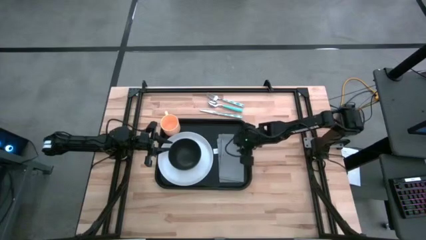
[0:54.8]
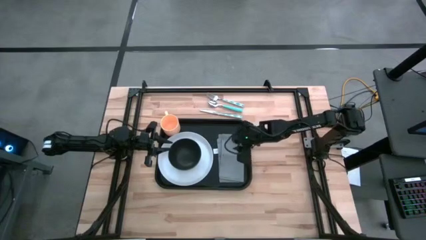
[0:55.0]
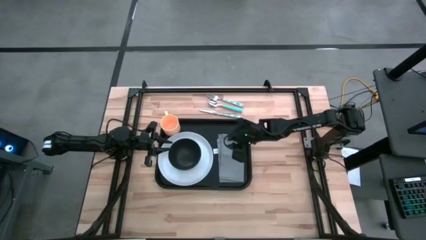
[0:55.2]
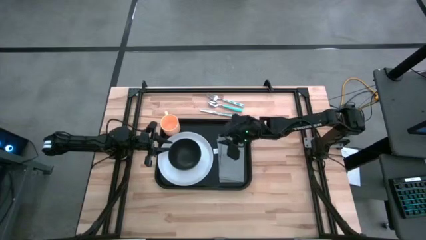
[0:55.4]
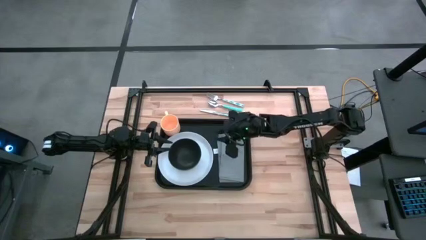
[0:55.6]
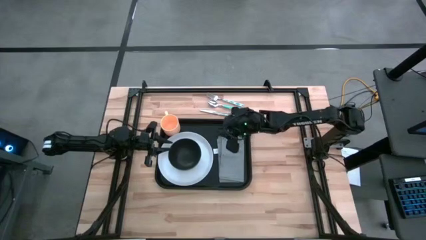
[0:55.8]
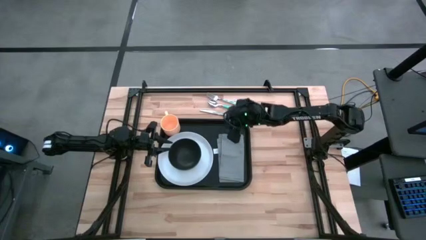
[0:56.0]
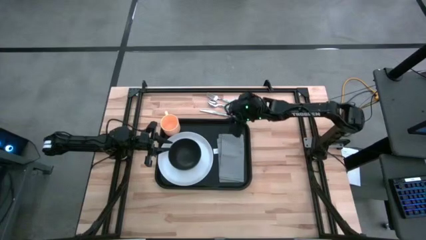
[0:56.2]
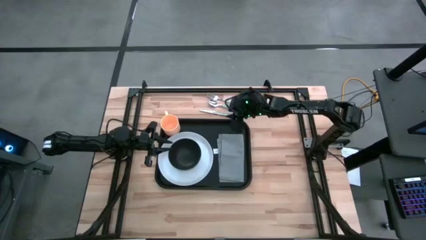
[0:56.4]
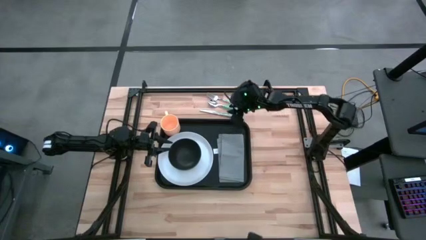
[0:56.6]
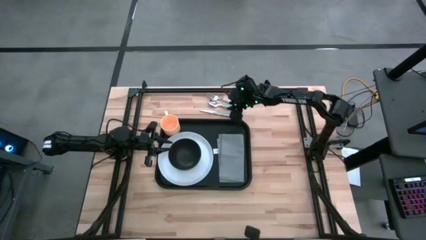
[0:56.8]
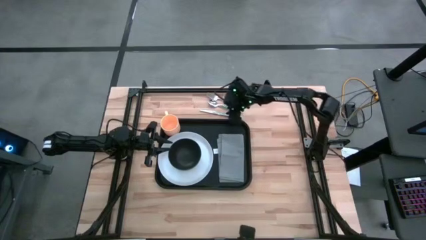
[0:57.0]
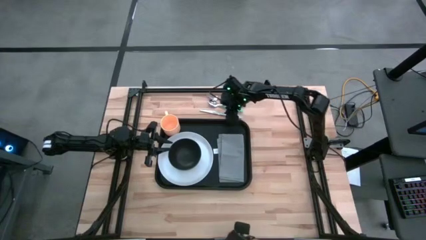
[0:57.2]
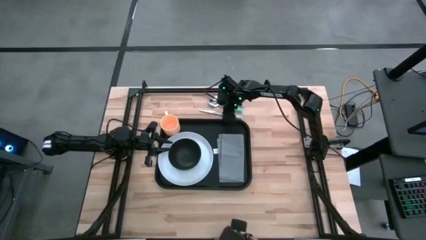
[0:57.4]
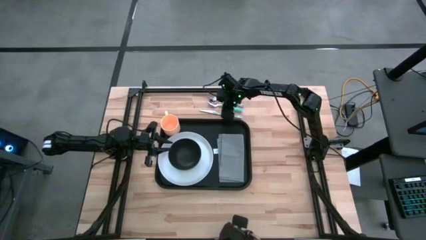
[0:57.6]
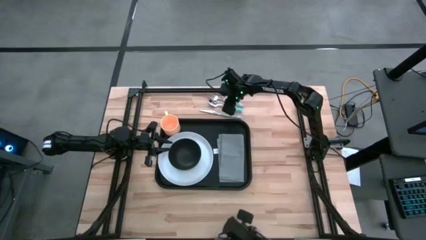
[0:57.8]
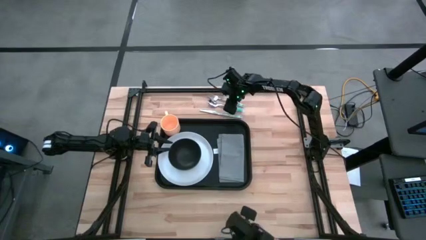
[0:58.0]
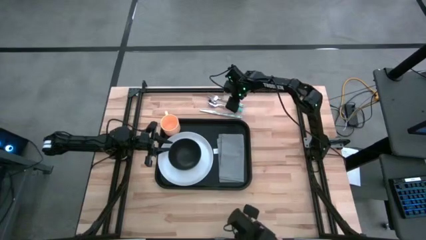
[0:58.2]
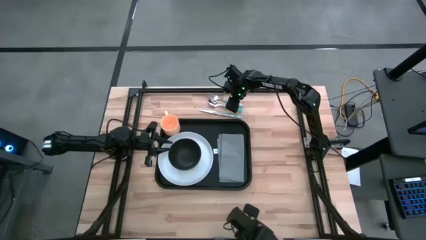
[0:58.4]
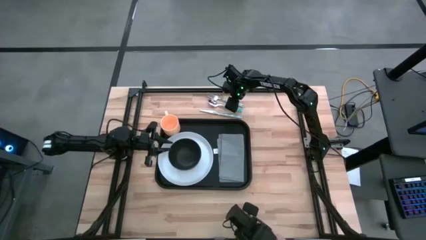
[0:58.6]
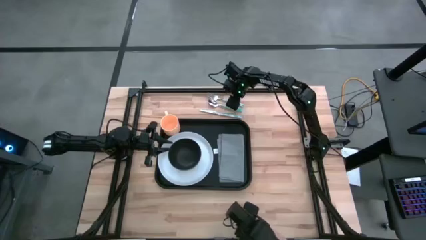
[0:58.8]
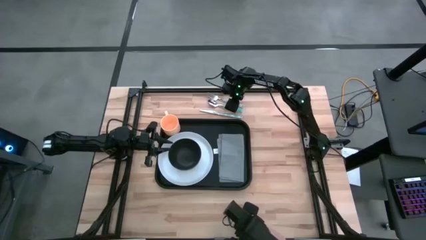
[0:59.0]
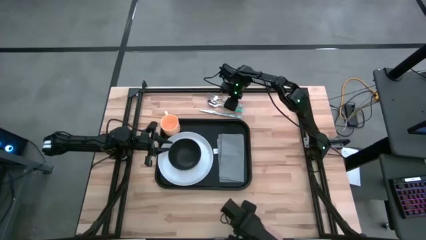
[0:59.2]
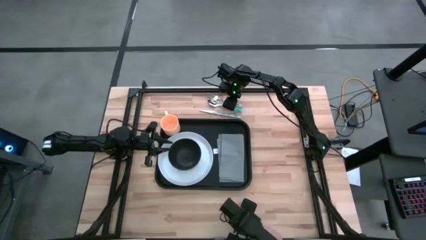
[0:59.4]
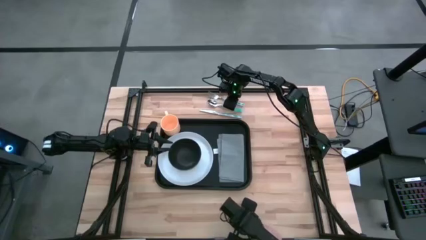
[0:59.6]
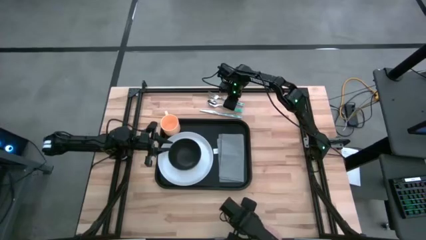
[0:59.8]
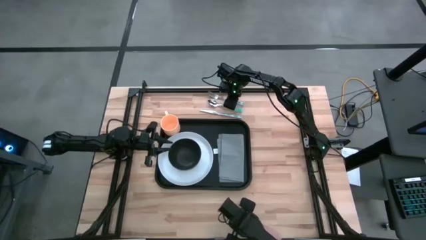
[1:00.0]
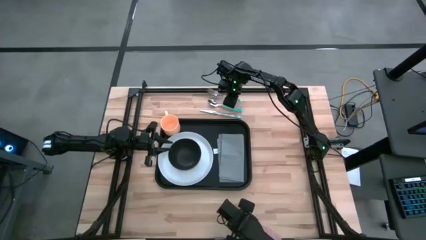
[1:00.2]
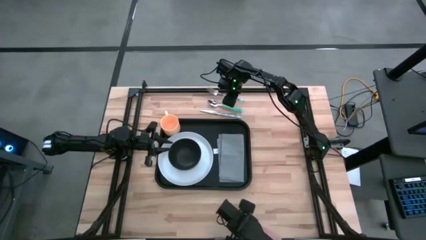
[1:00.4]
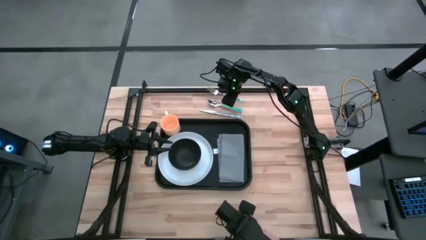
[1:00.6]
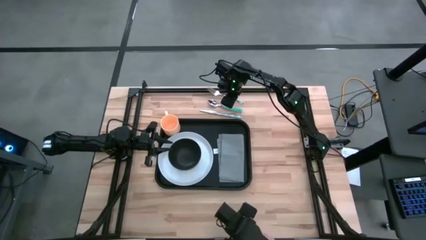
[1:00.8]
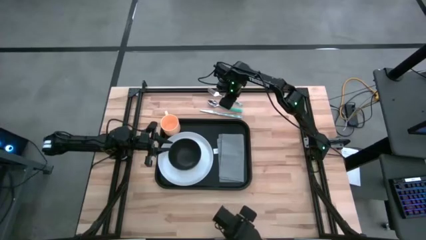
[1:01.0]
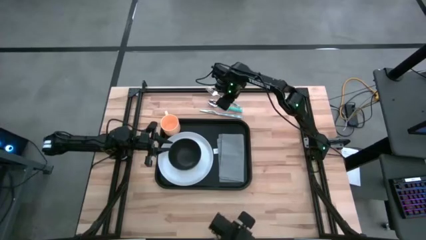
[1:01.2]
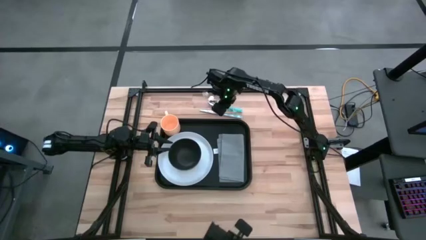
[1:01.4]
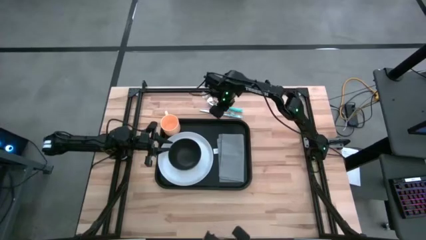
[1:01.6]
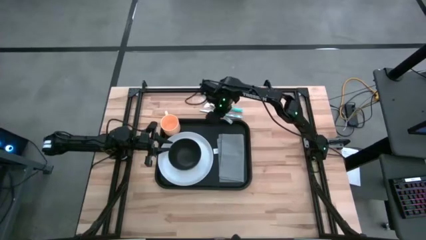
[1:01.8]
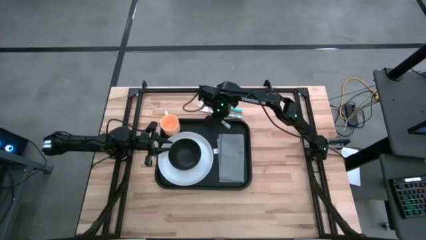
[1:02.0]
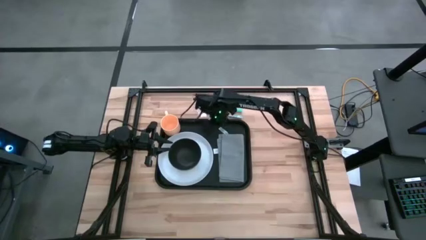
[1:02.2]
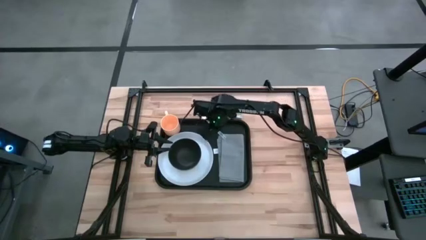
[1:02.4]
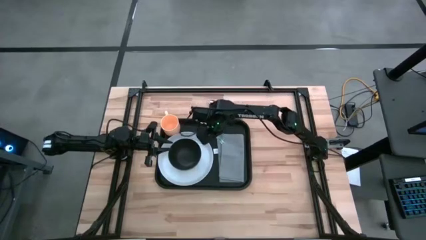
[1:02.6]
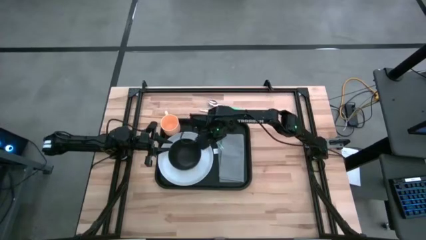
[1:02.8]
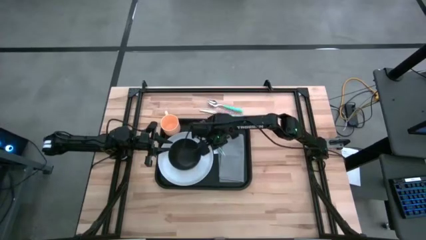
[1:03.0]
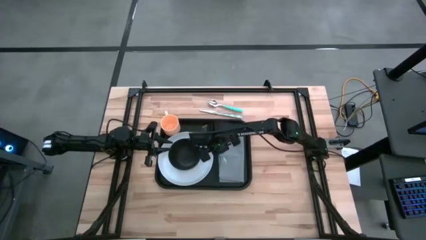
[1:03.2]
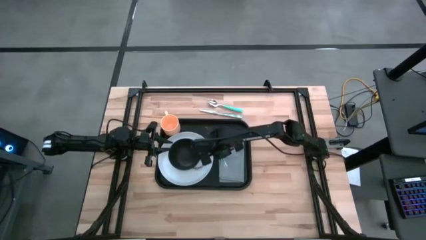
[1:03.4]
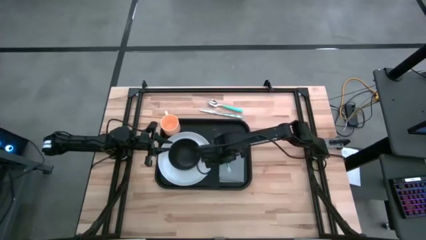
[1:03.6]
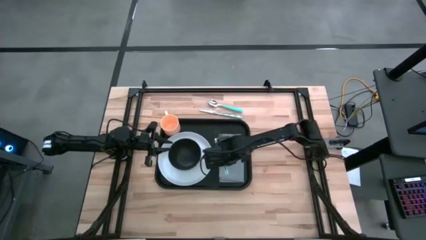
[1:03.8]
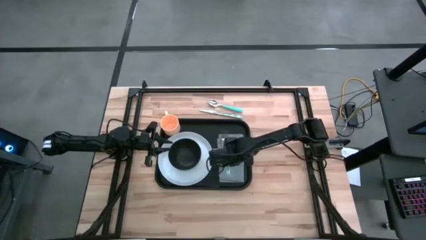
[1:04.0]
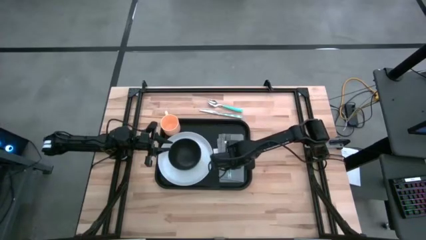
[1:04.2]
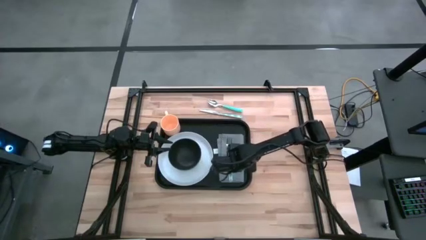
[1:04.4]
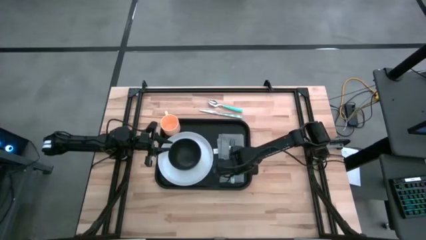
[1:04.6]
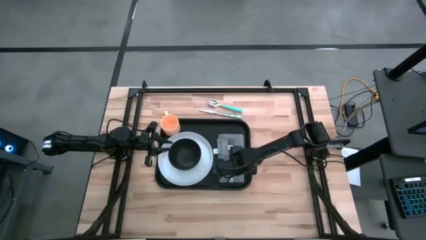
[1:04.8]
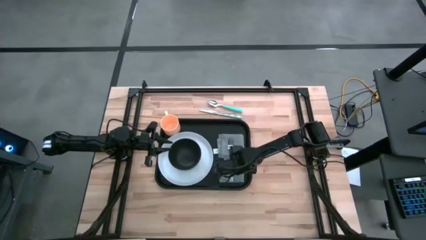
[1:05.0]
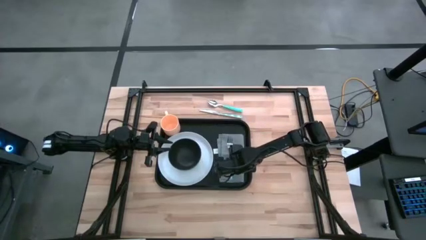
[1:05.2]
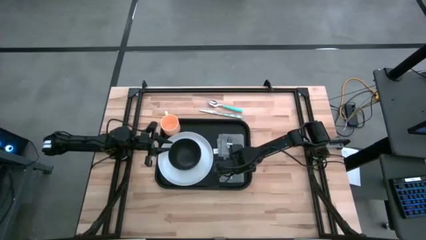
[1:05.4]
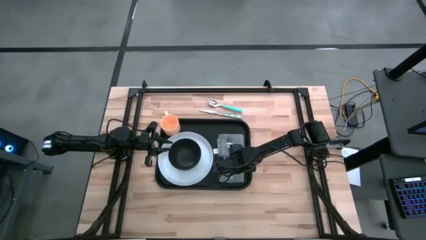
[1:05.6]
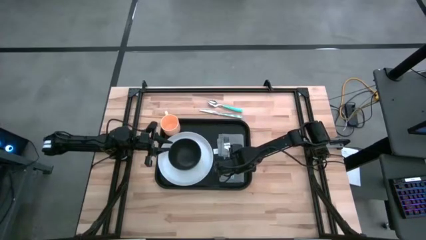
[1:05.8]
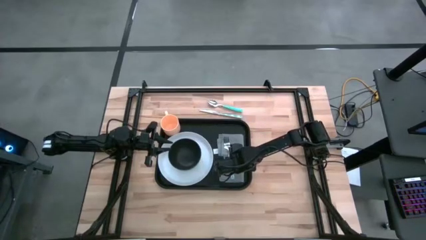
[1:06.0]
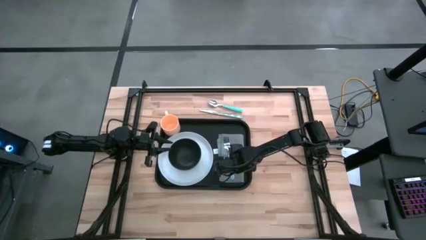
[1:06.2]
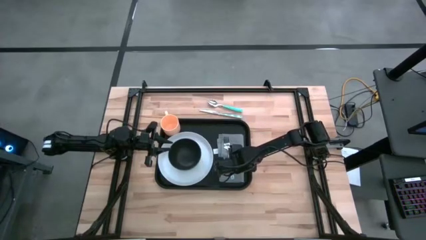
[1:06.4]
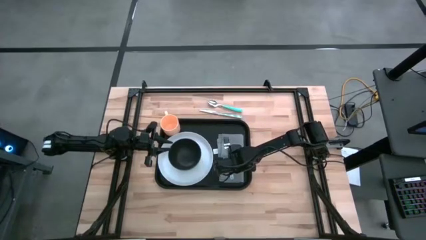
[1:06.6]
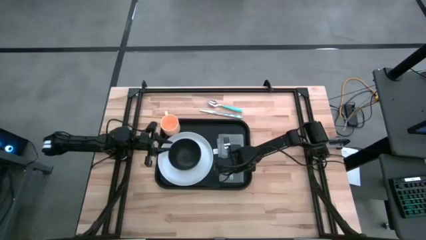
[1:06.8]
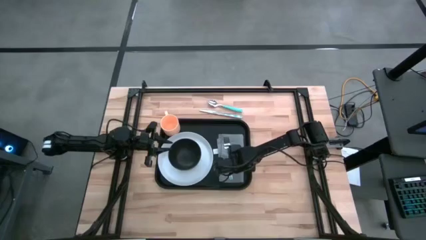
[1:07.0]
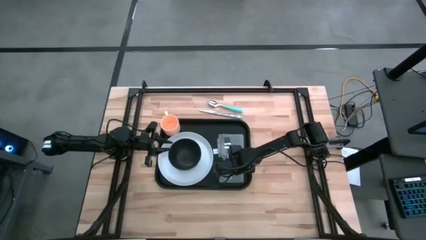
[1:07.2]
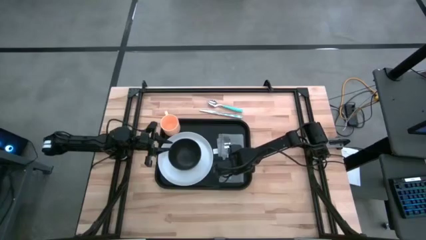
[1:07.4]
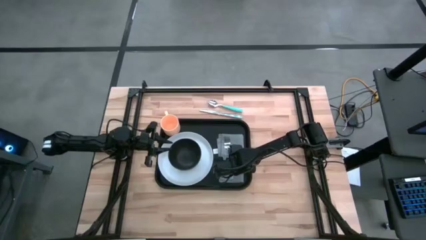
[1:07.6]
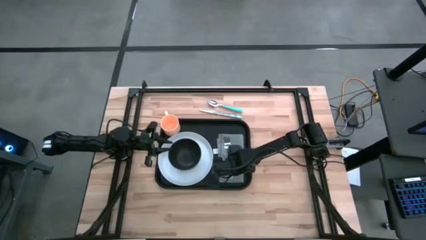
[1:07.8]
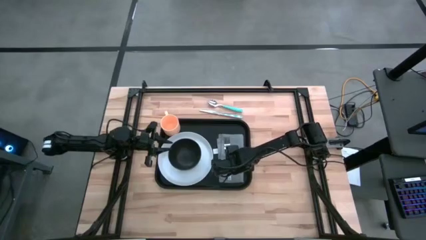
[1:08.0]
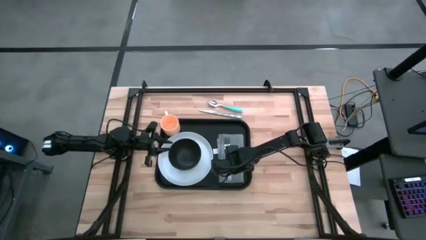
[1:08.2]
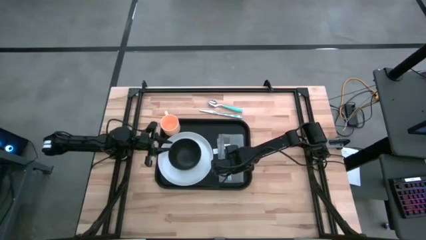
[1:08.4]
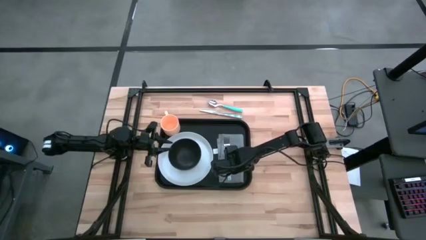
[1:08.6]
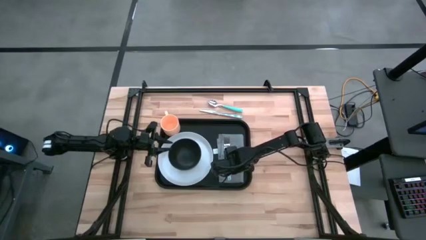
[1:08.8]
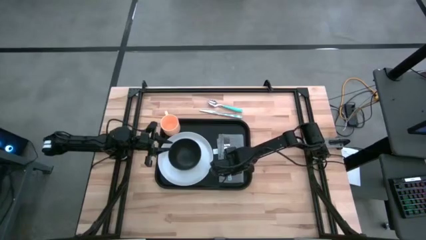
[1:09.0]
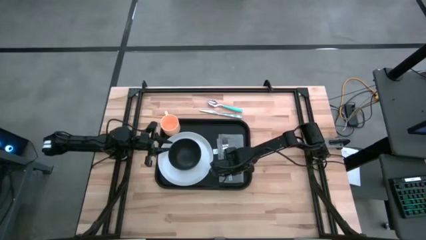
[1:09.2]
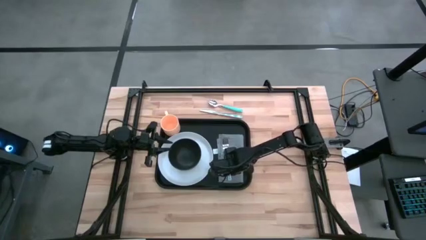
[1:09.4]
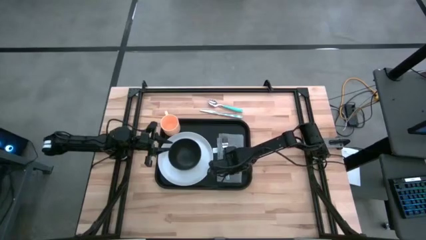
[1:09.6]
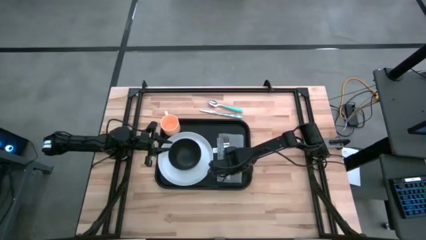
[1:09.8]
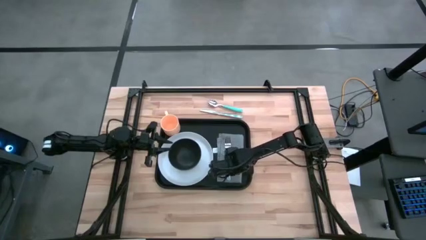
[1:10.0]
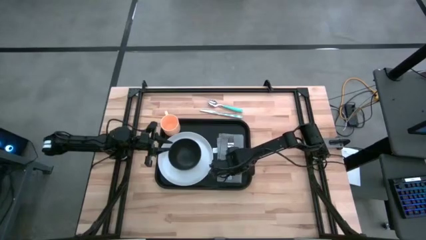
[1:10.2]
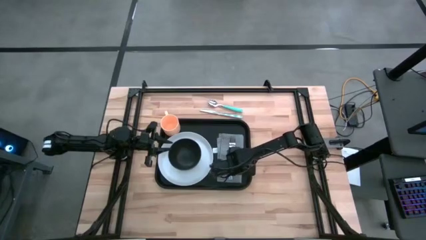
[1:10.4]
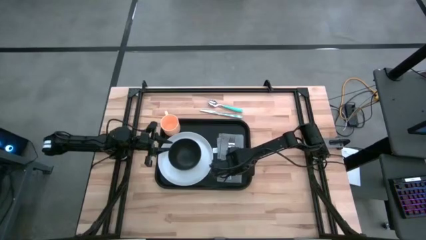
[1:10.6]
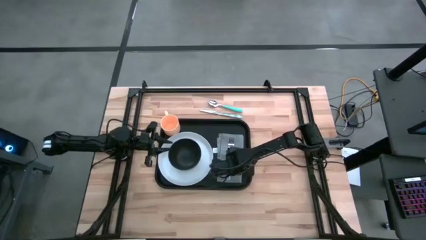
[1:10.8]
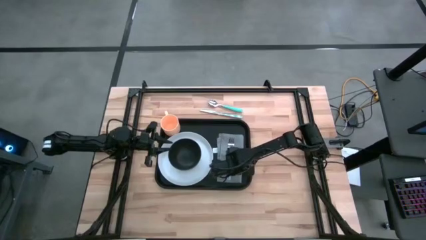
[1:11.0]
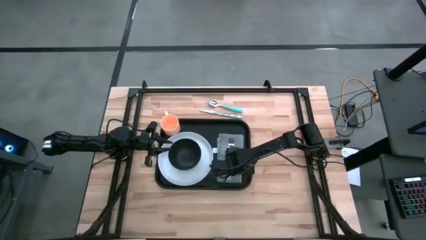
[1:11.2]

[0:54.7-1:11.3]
Task: Set up tray
Put the blue fork on the gray tablecloth on the black table tray
